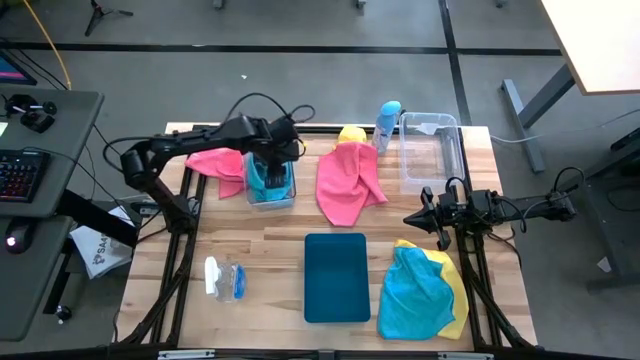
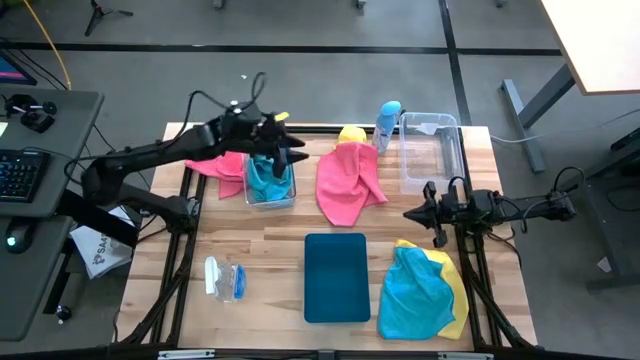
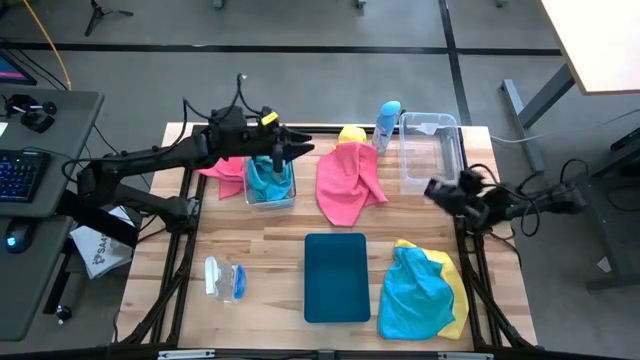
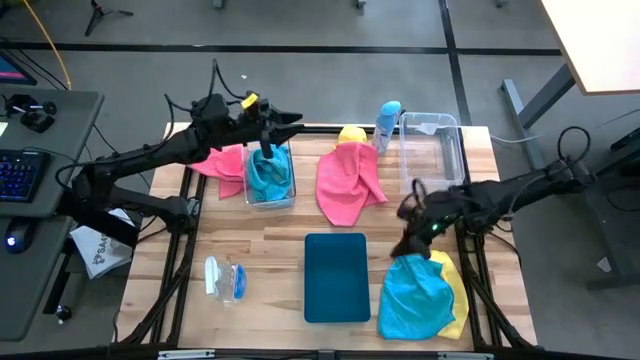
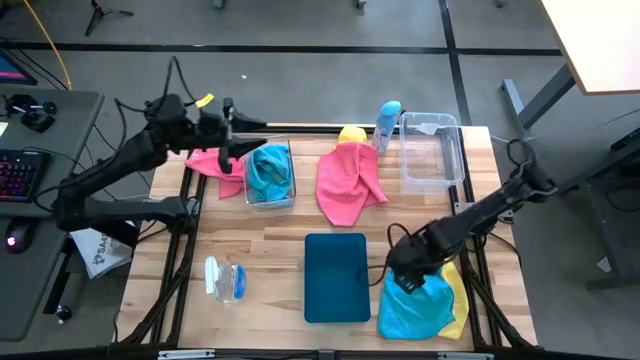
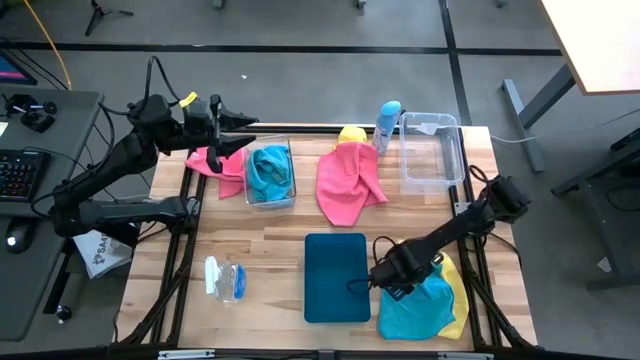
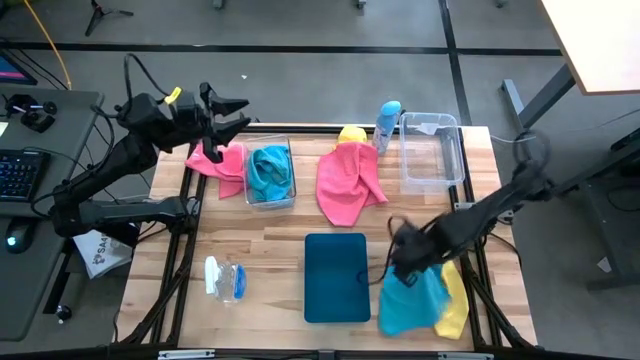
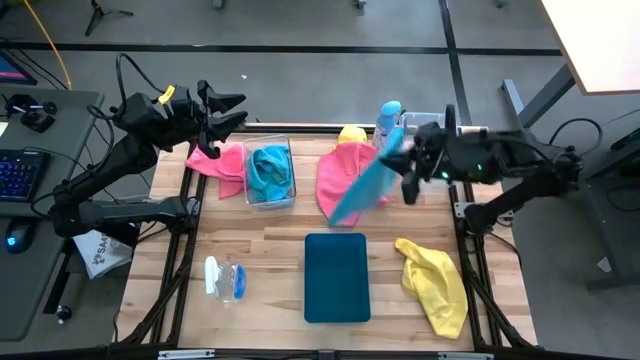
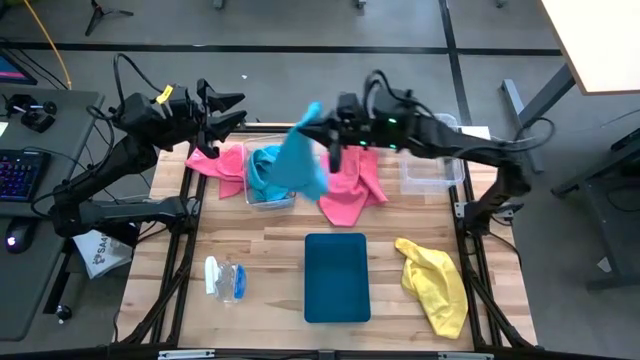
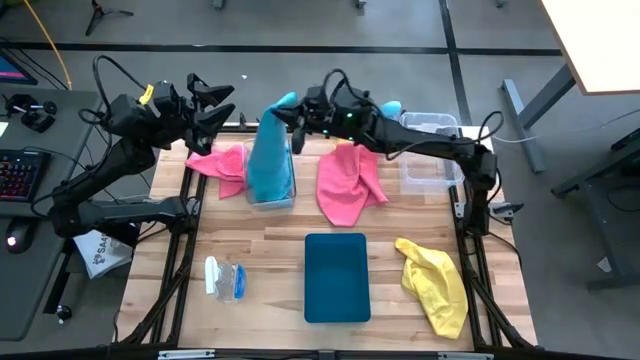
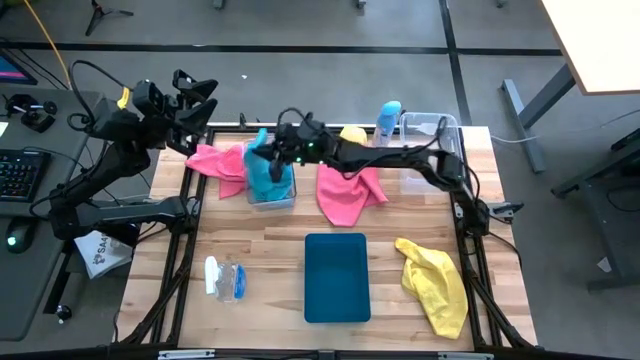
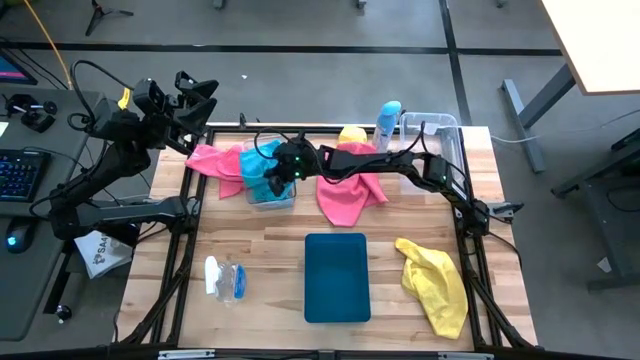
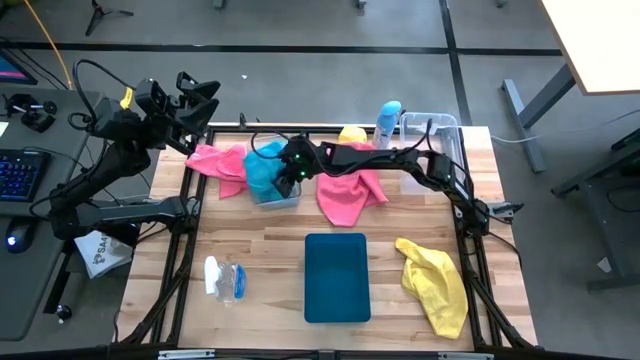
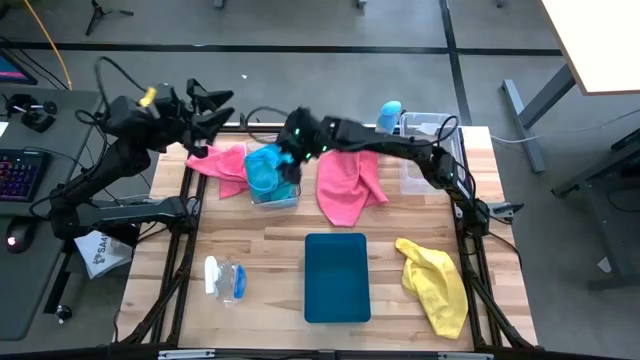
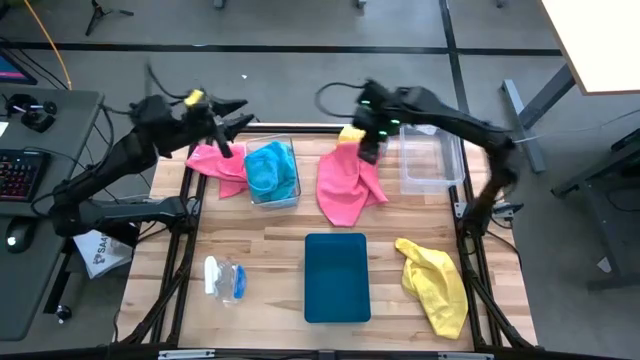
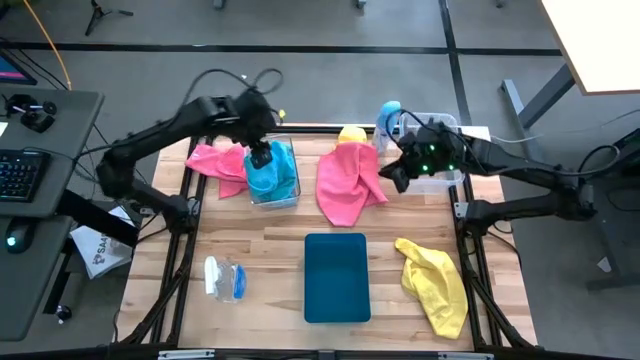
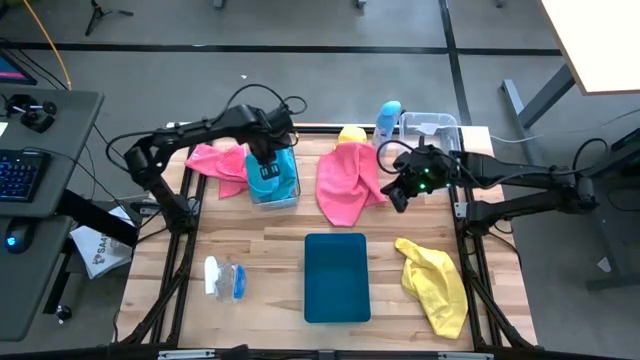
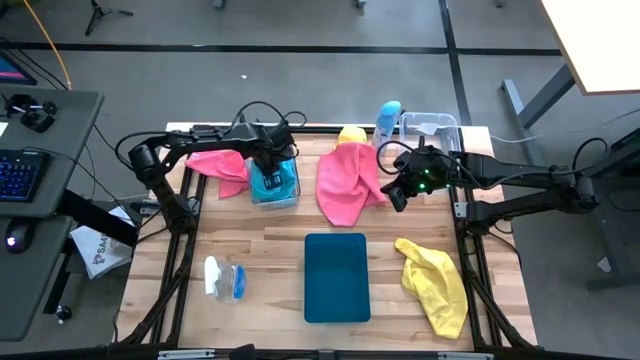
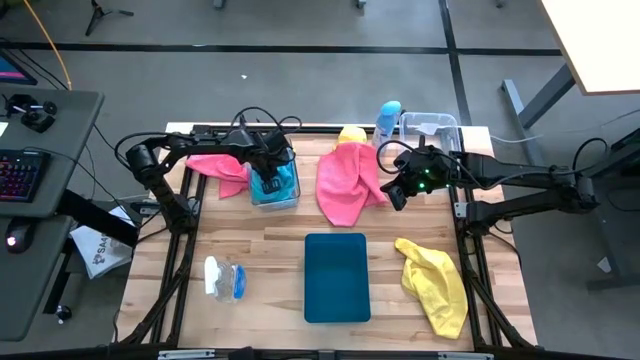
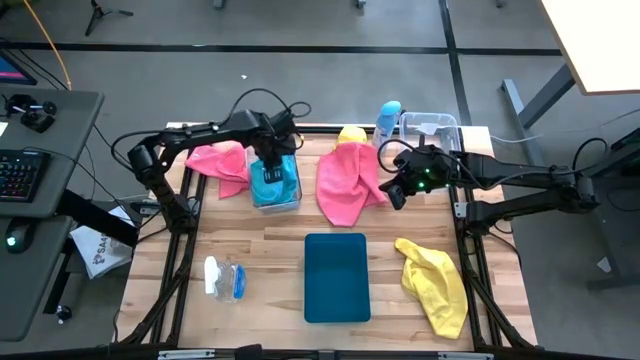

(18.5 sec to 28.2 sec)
Task: Sort microfiber towel by color & place in baskets
Put the blue towel into the left transparent bin

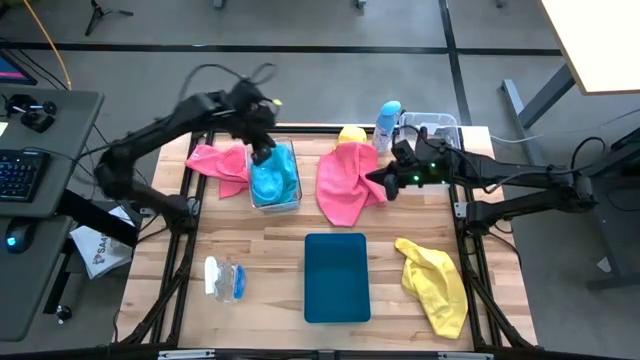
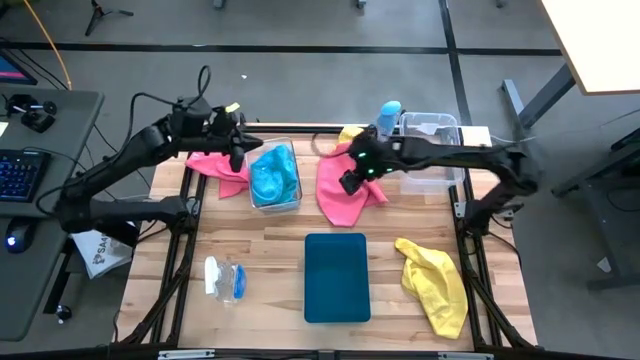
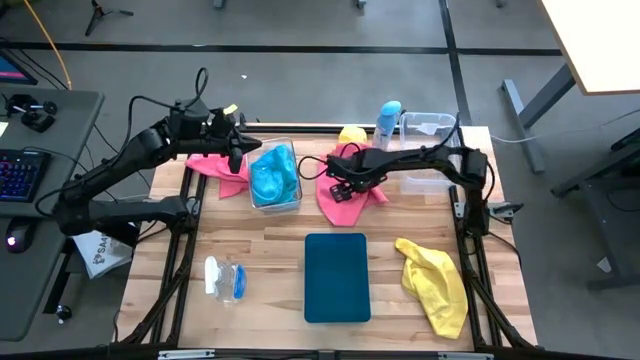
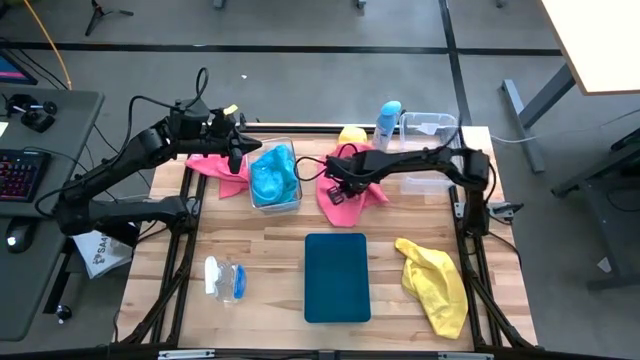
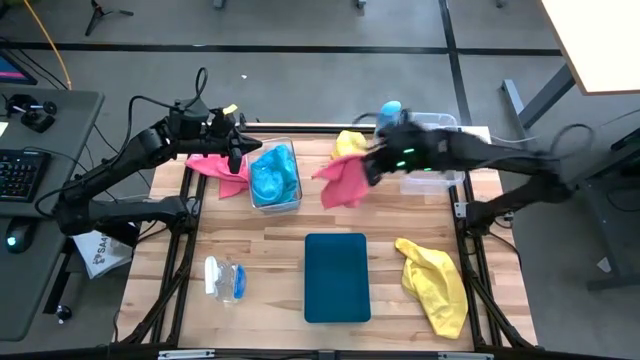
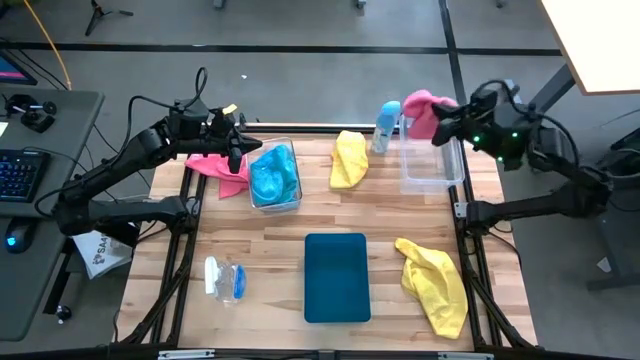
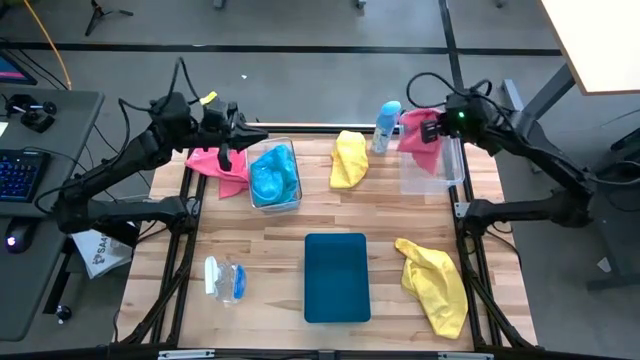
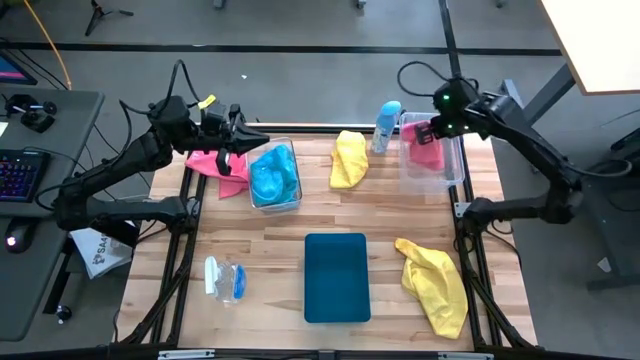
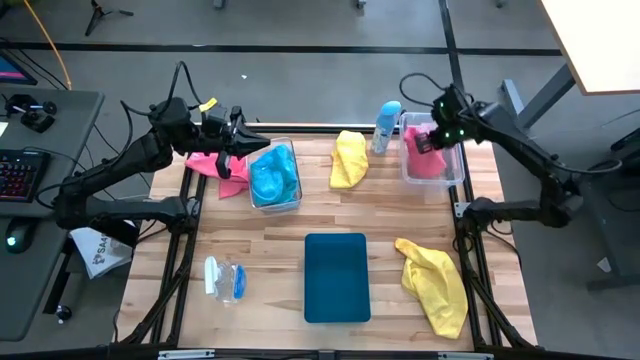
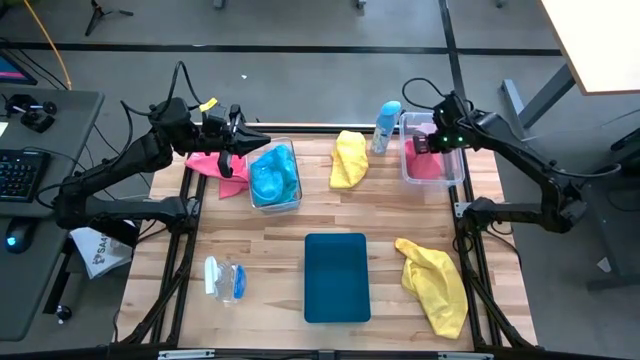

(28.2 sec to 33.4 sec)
Put the right pink towel into the right transparent bin

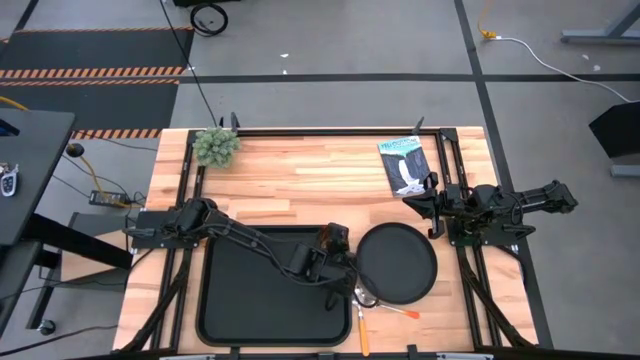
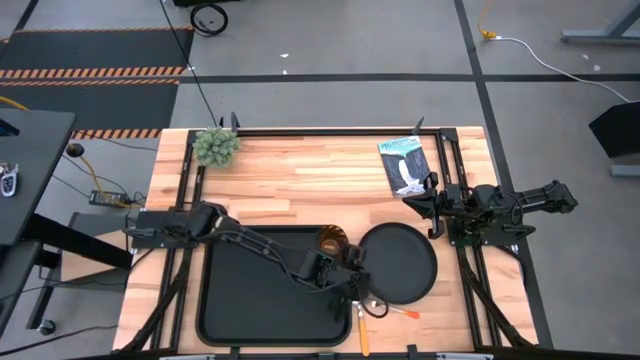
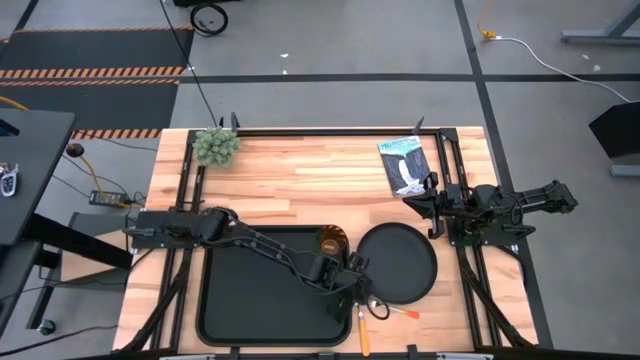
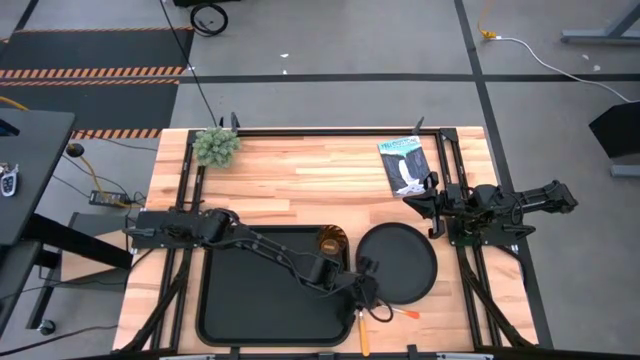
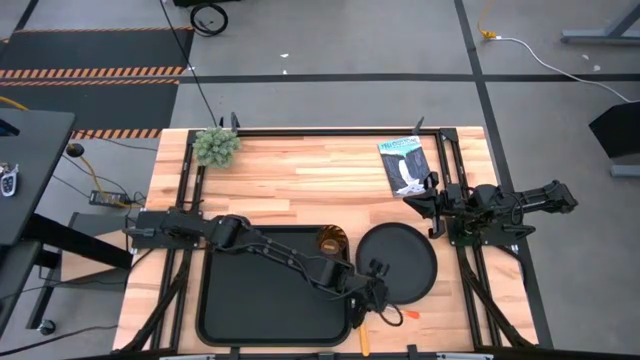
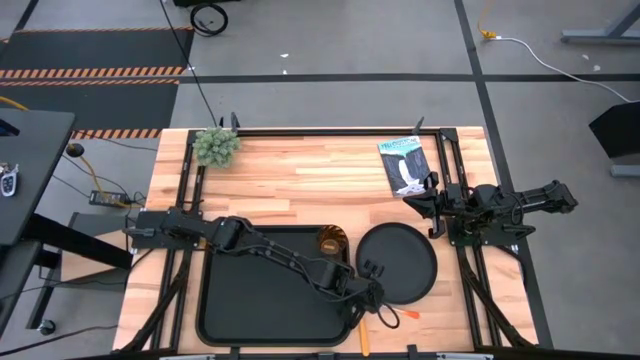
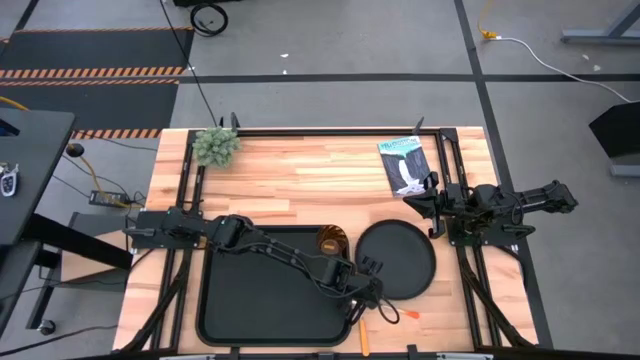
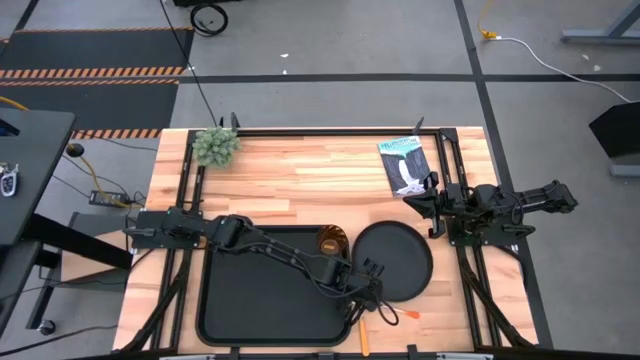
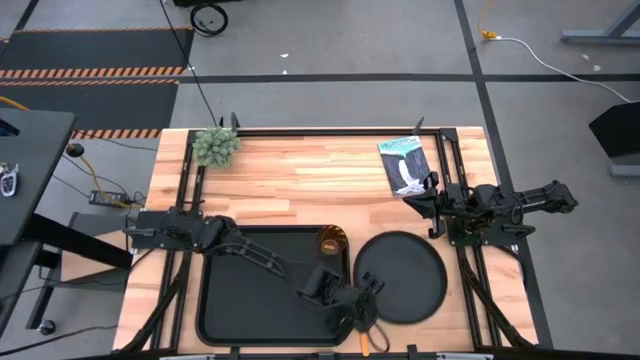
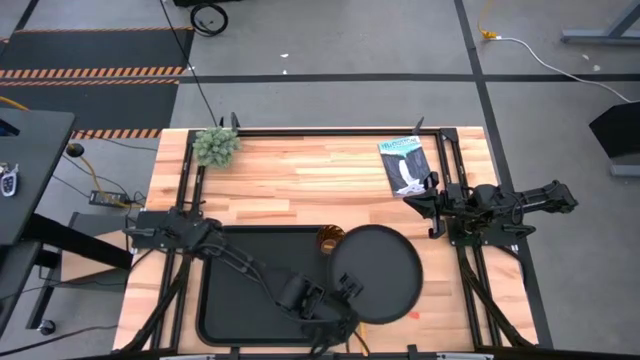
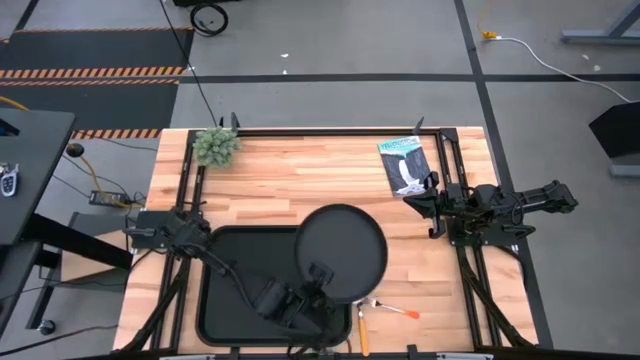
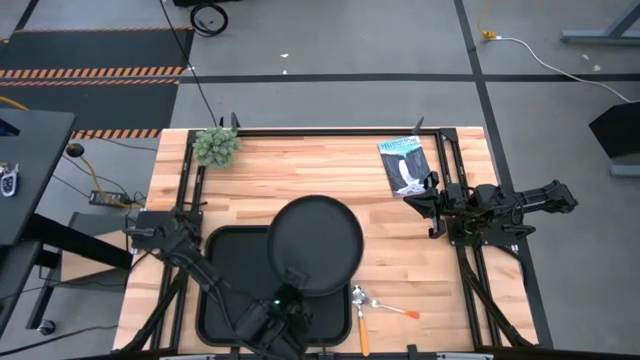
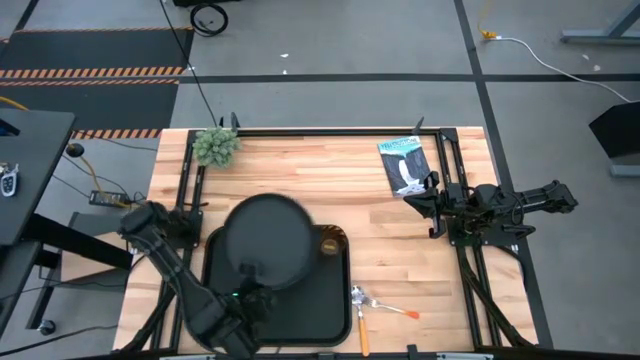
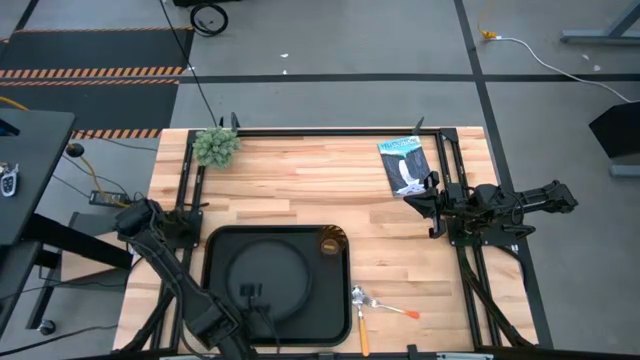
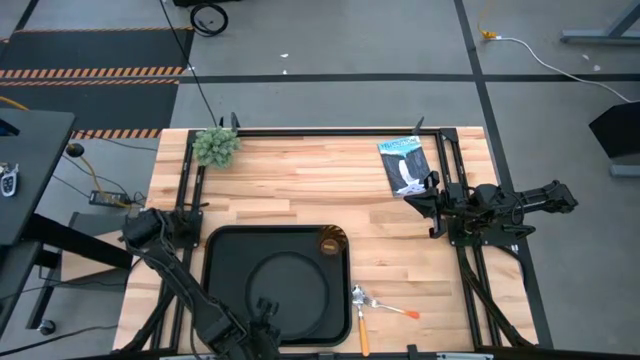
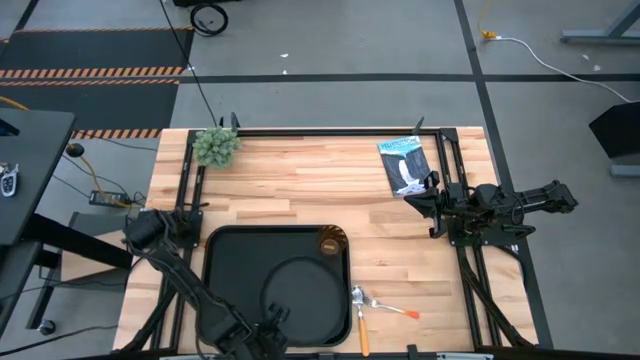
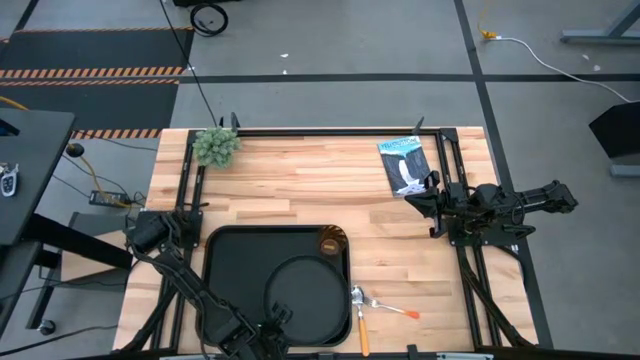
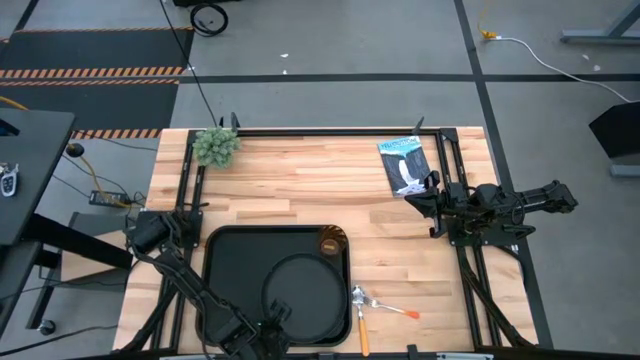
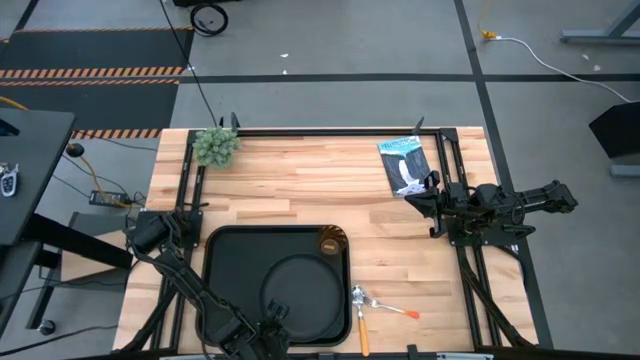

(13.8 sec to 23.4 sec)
Task: Pick and place plate/cup/fork/spoon on tray
Put the black plate on top of the black tray
